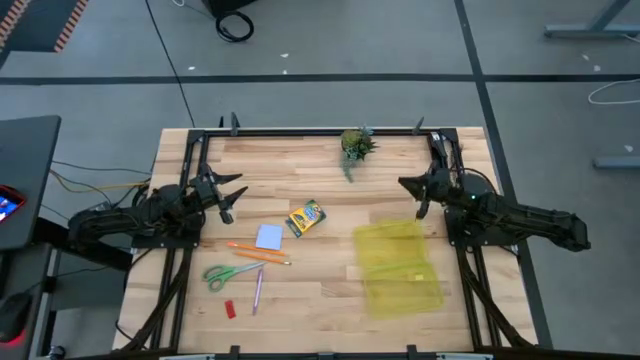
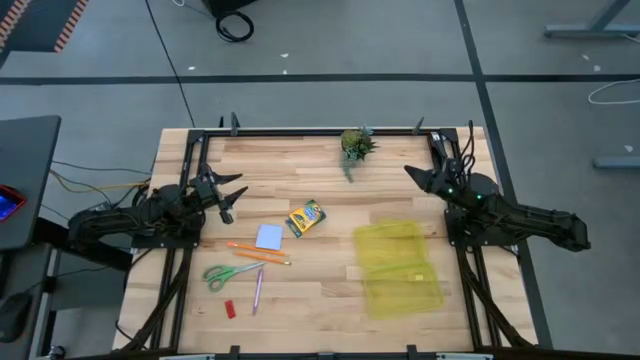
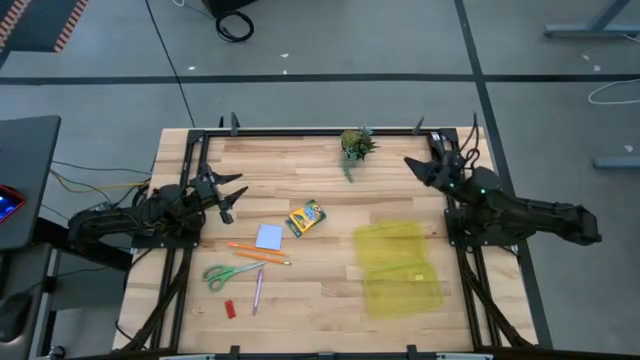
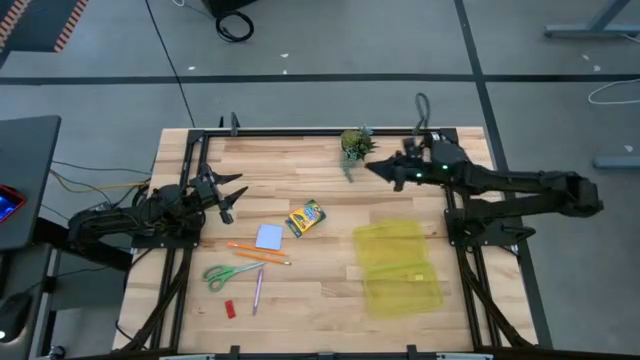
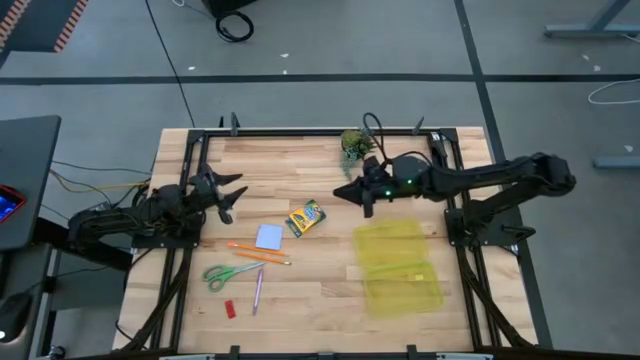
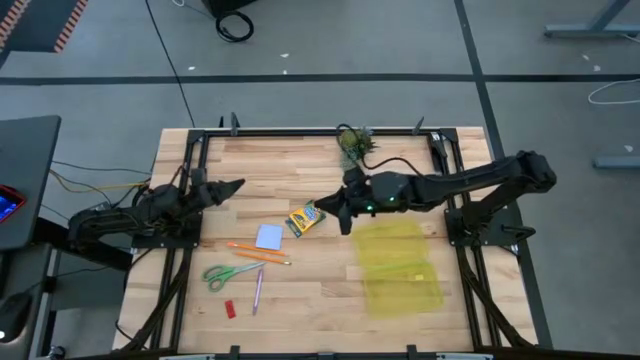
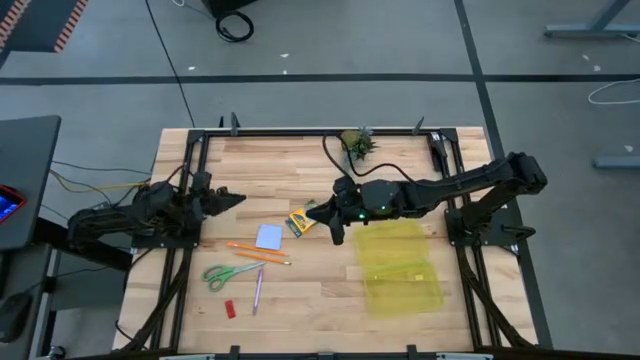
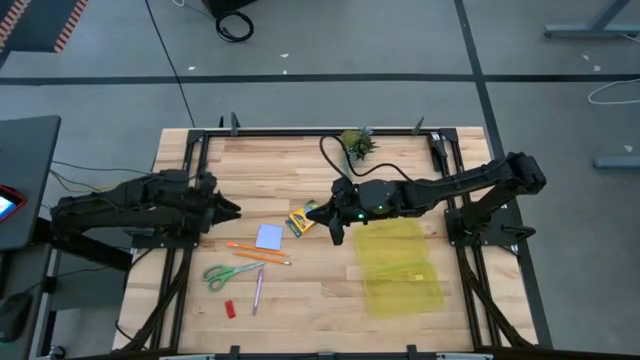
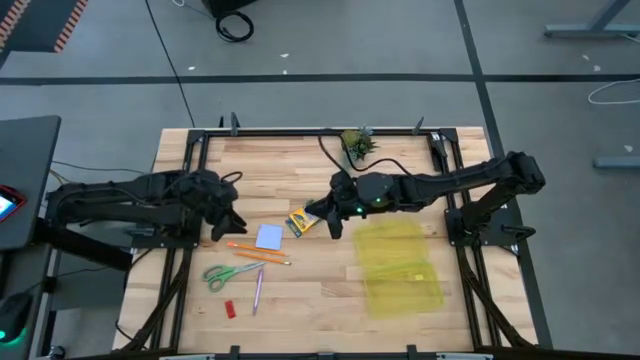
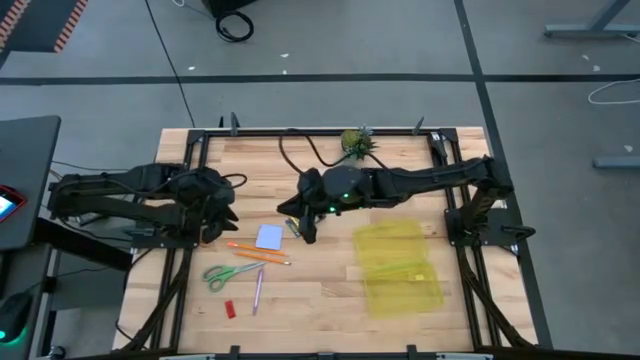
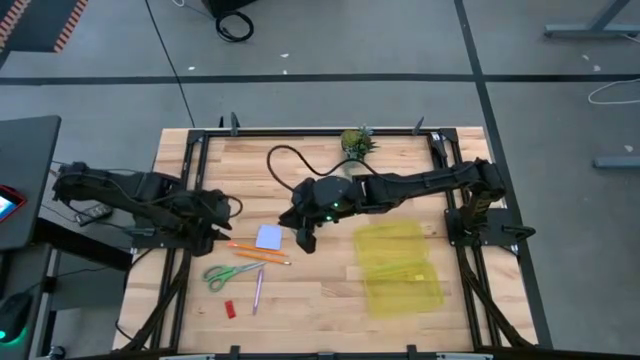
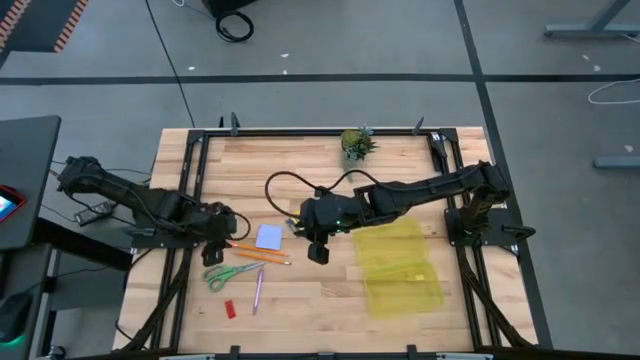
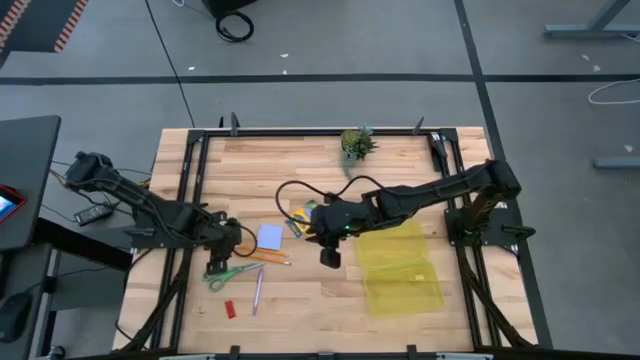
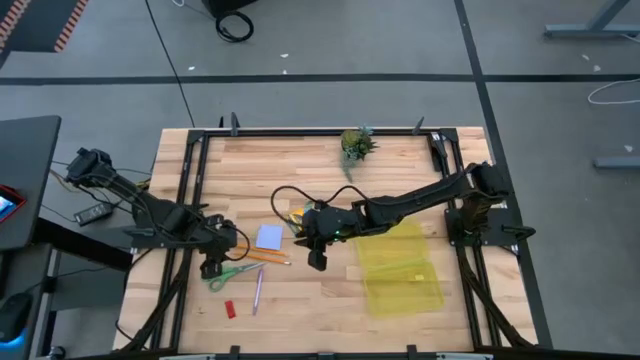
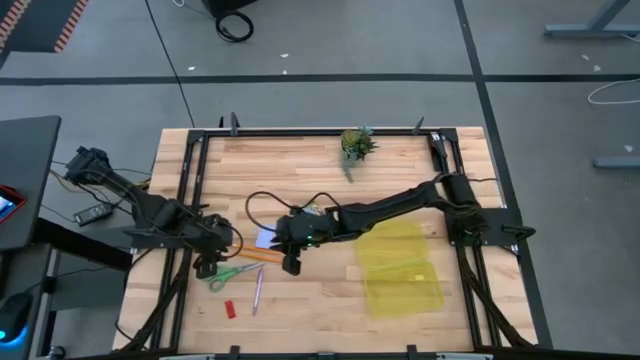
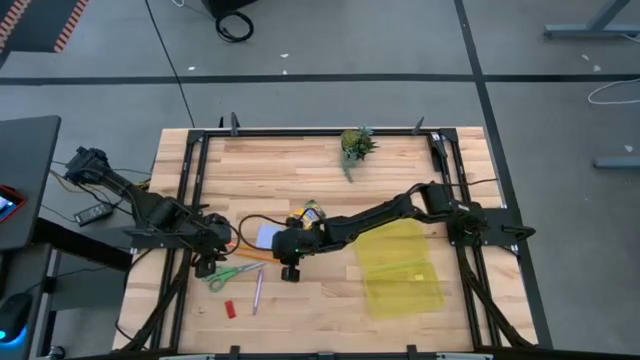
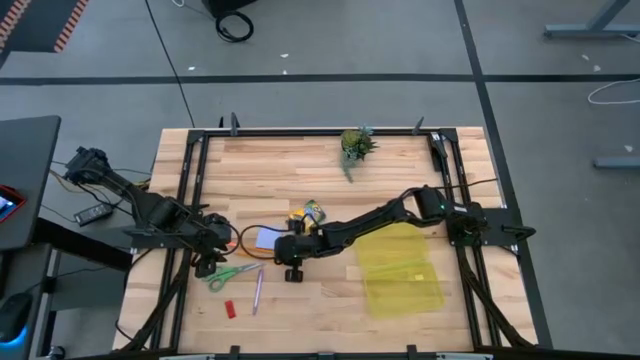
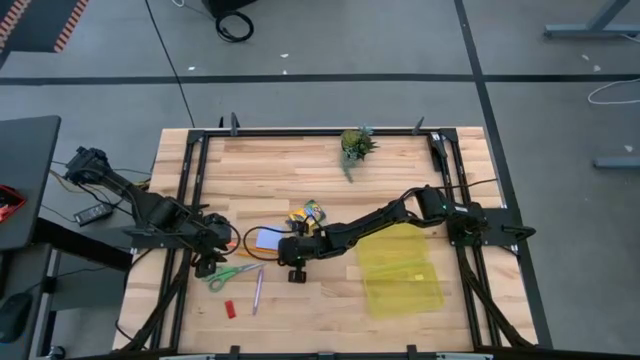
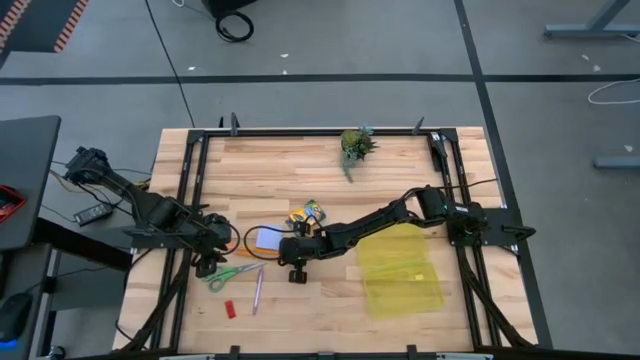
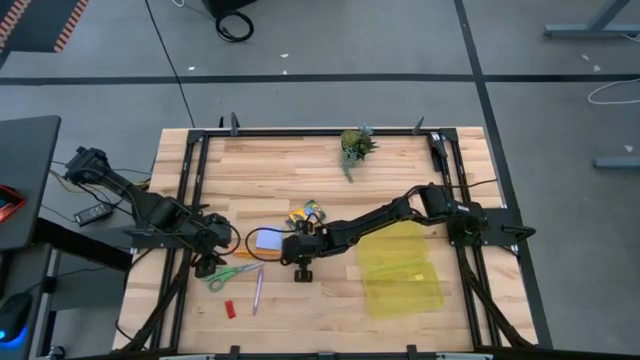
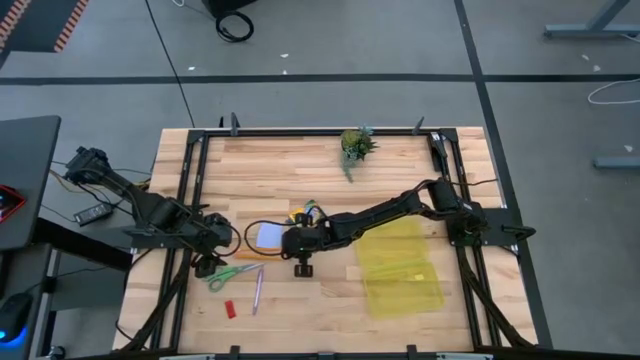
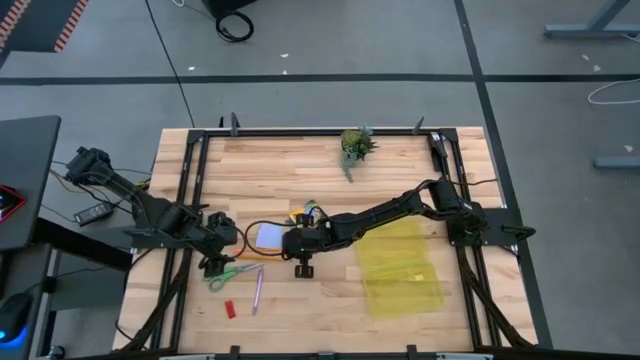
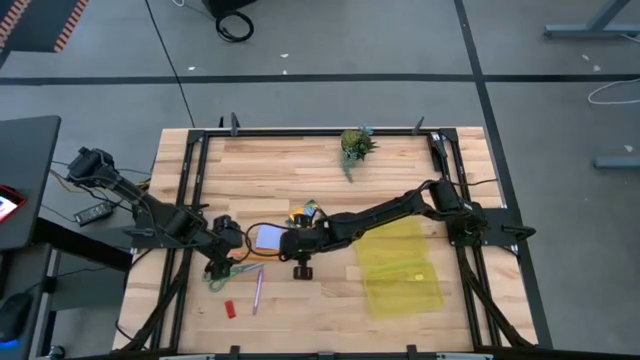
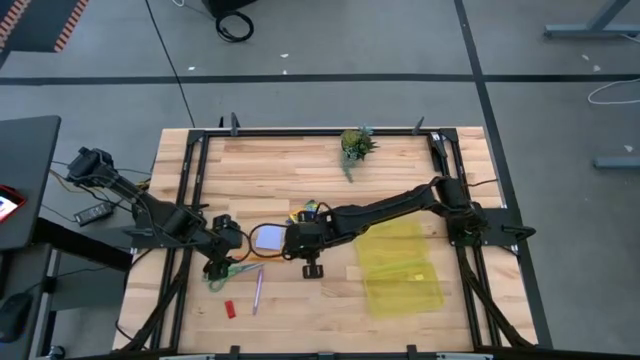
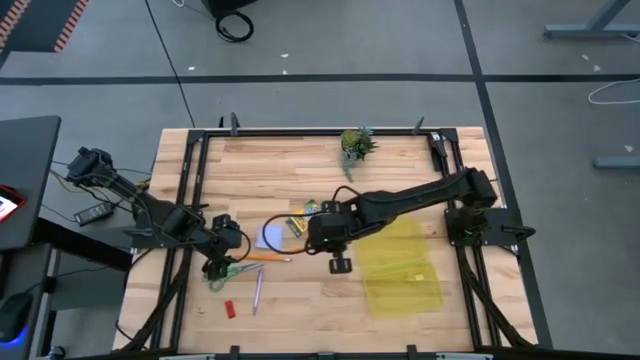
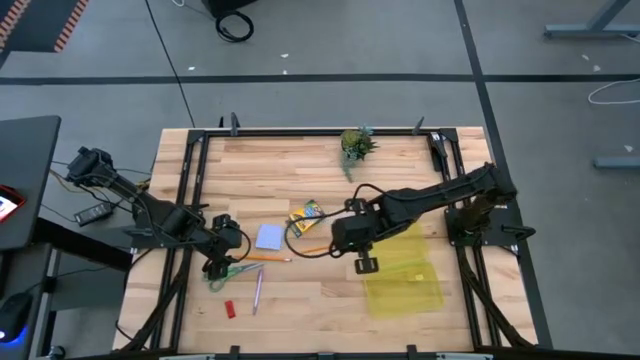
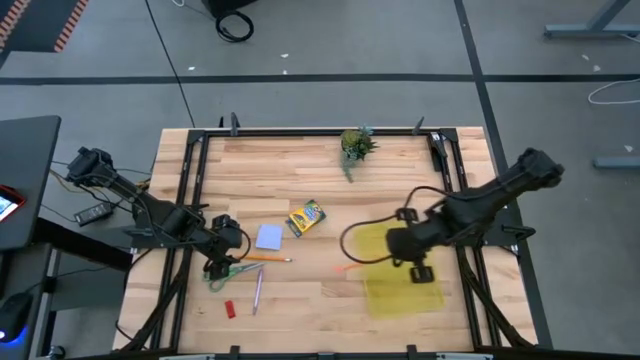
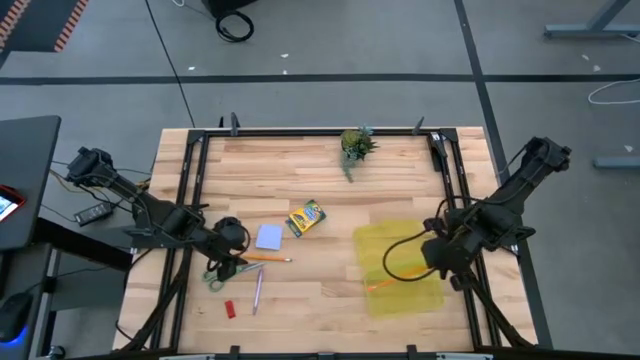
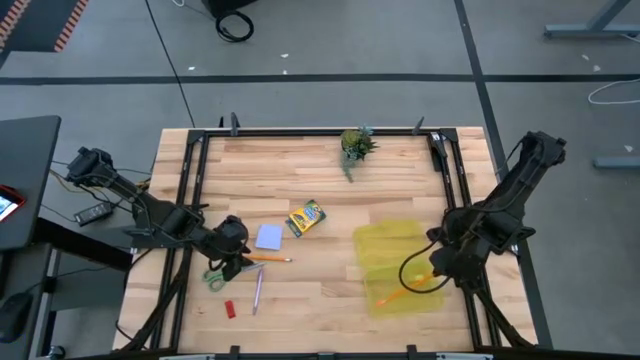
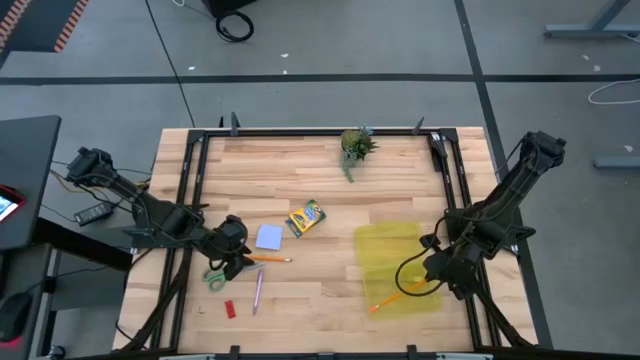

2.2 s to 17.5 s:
Task: Pack school essentials
Put the top orange pencil into the yellow supply box

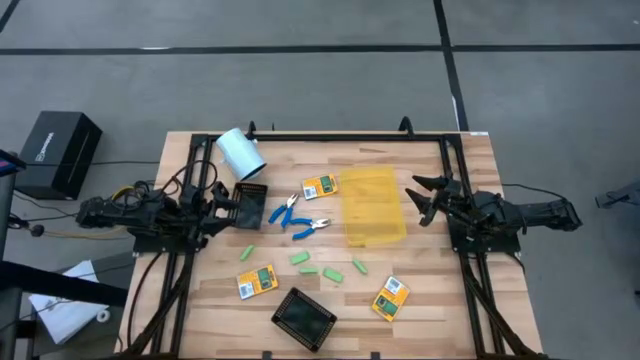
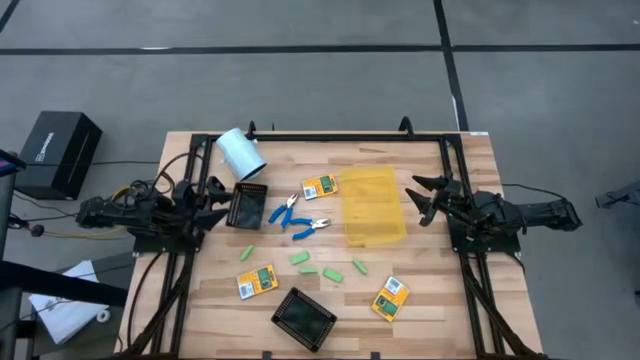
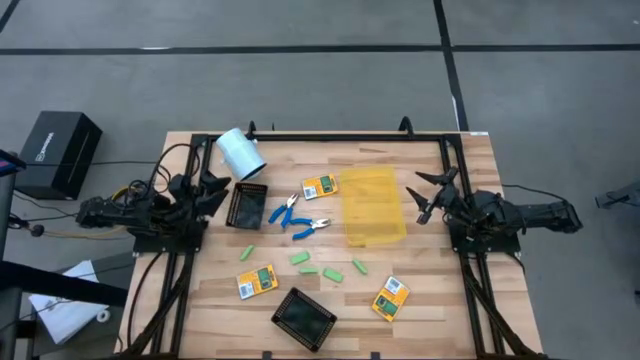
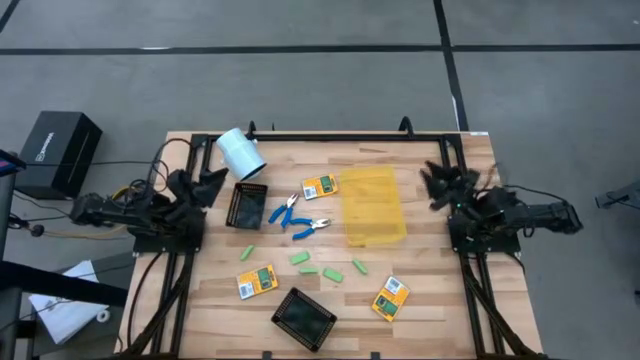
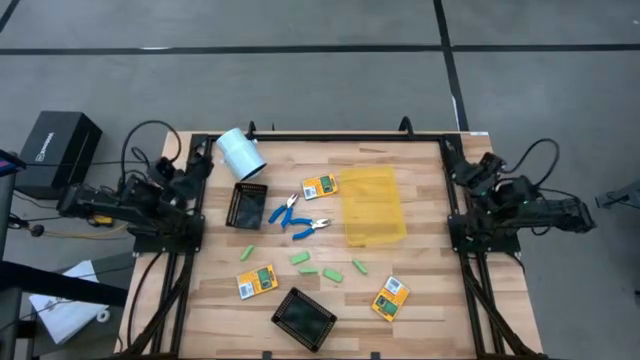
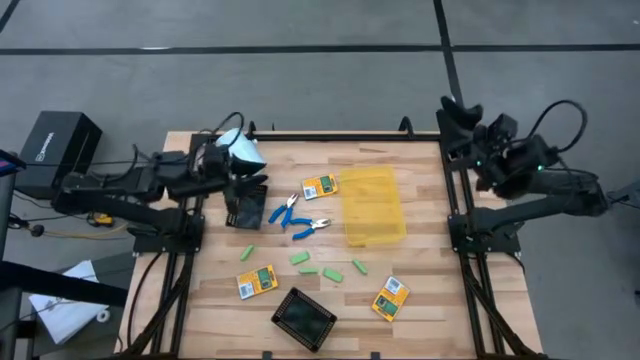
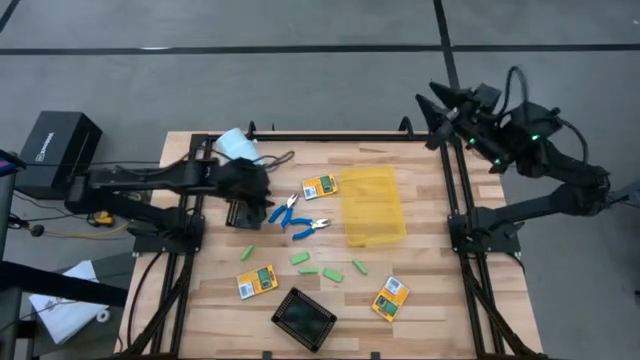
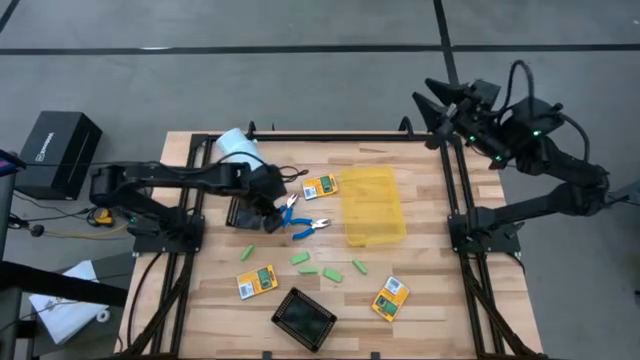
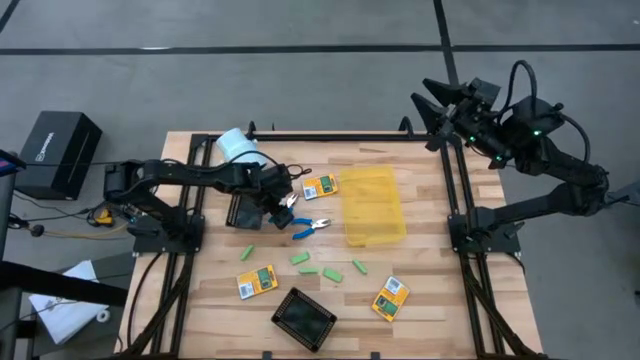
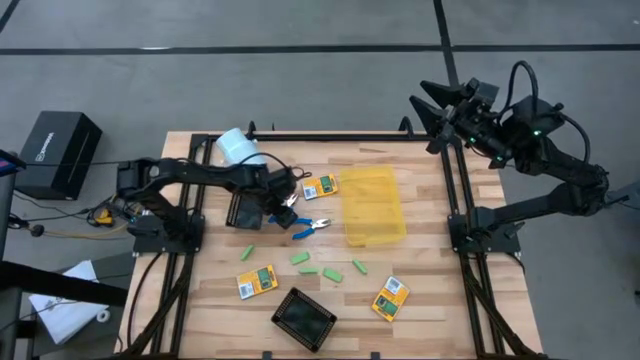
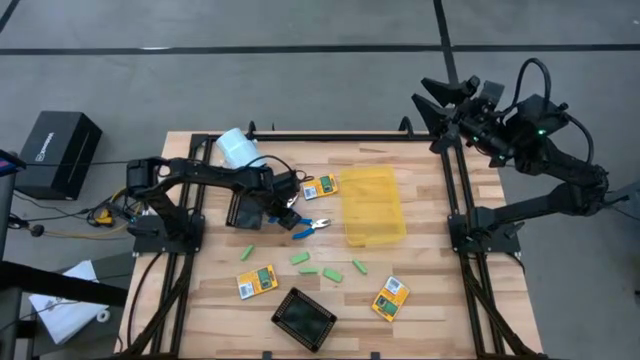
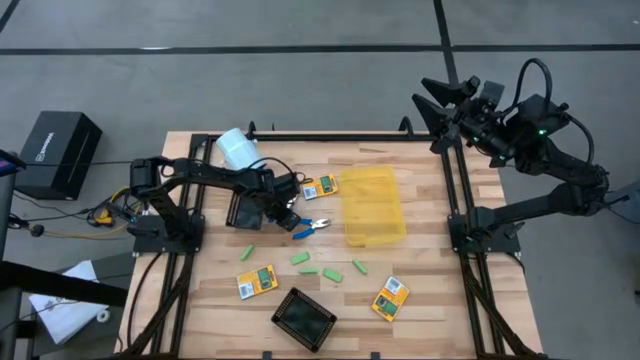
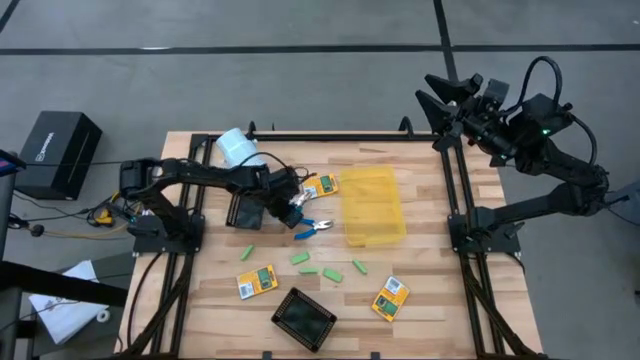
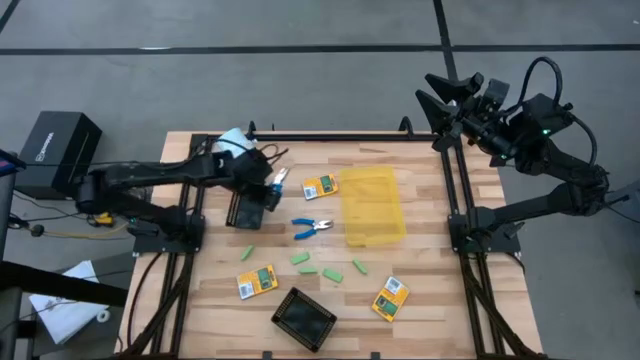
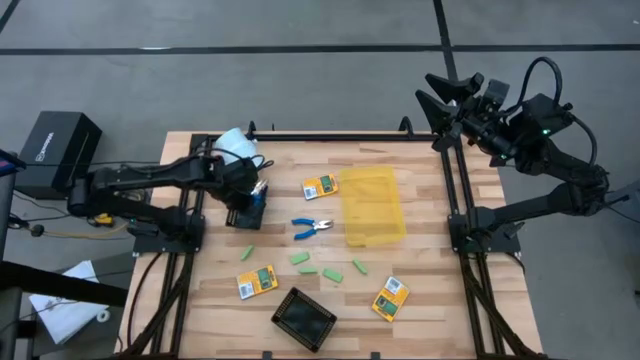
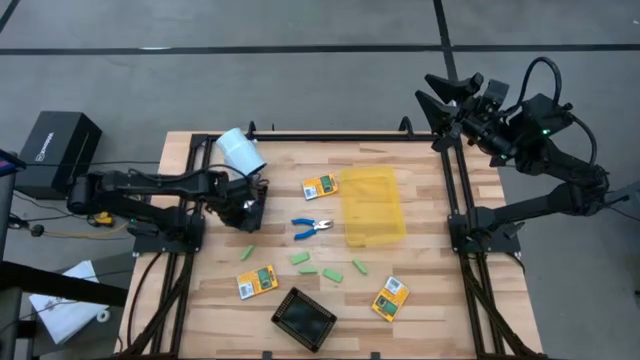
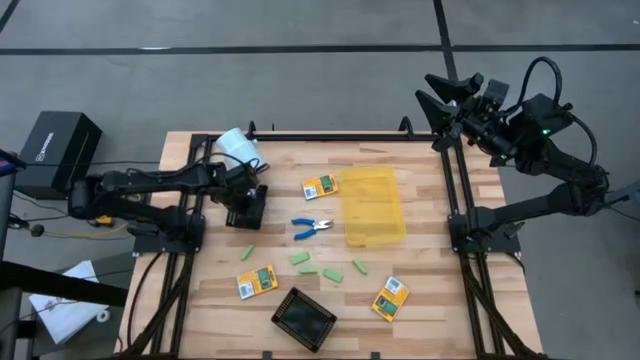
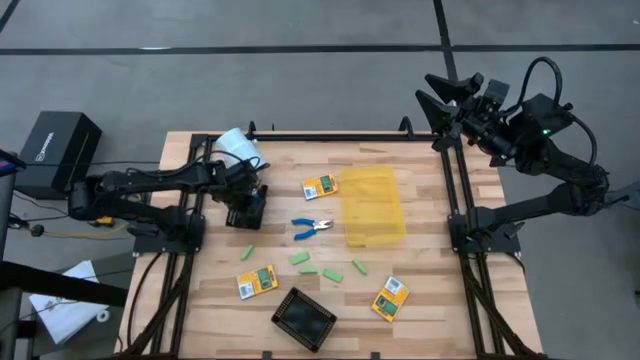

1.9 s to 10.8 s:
Task: Pick & Place School Supplies
Put the left blue puncher into the top black bin
